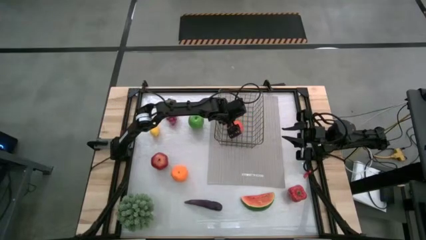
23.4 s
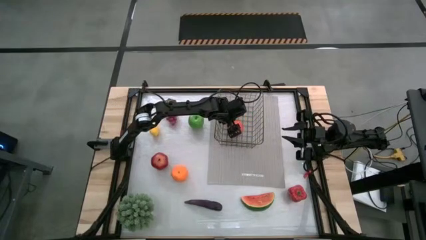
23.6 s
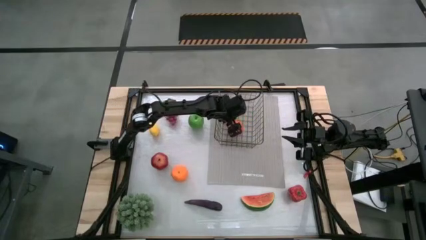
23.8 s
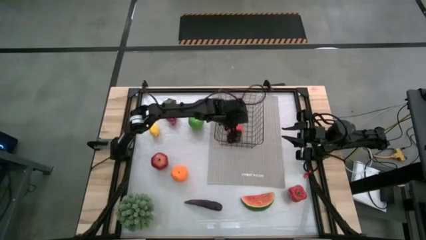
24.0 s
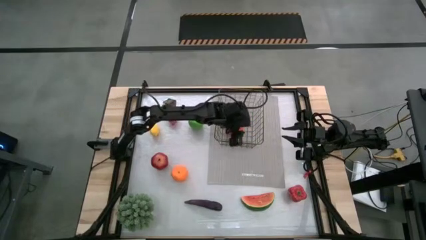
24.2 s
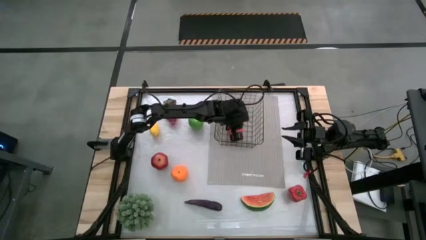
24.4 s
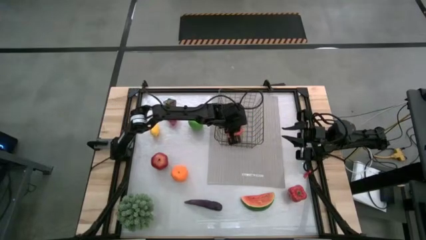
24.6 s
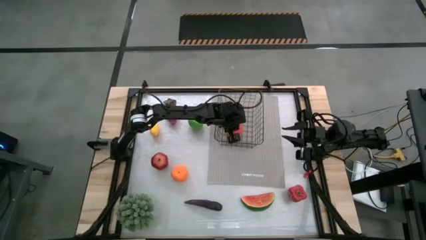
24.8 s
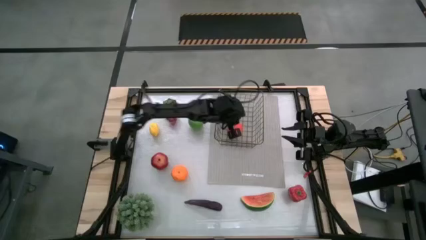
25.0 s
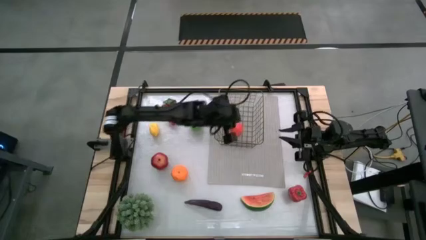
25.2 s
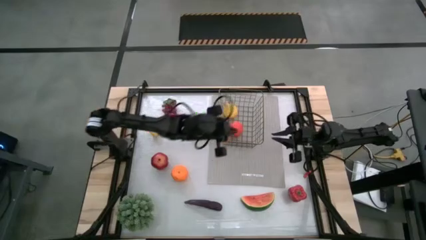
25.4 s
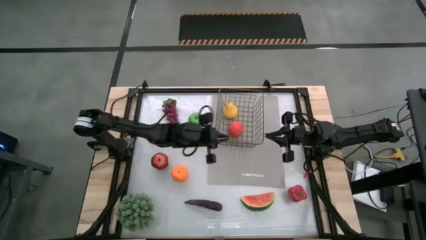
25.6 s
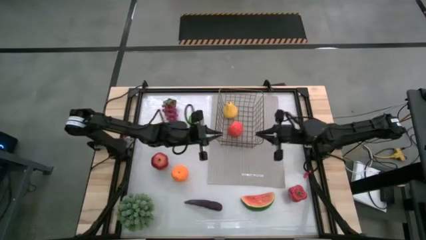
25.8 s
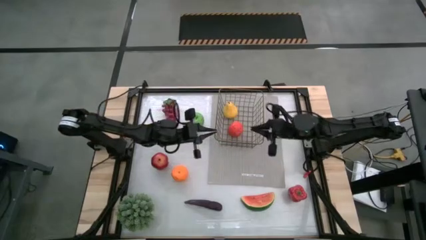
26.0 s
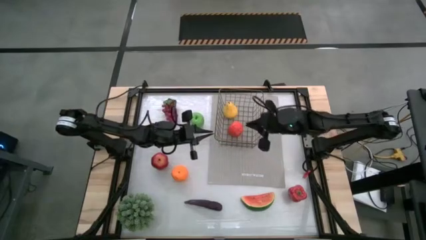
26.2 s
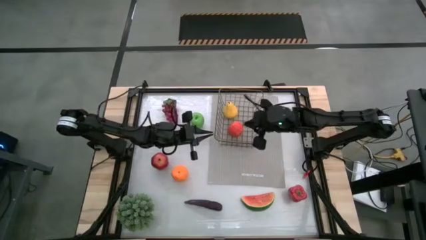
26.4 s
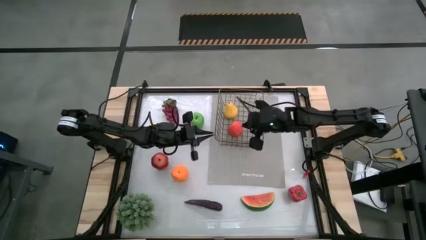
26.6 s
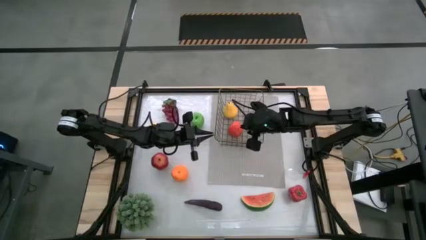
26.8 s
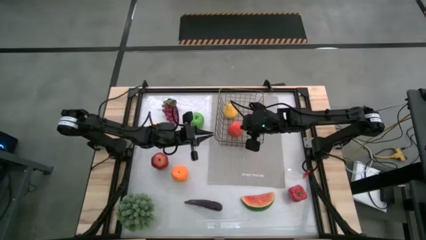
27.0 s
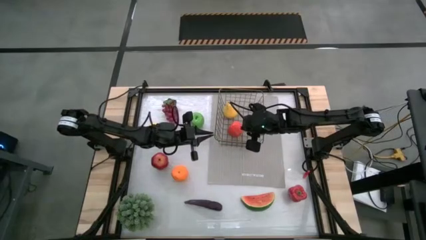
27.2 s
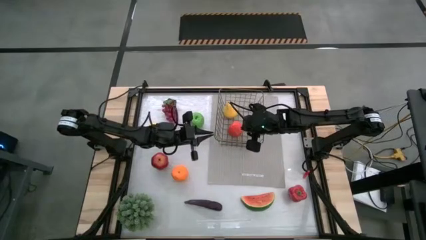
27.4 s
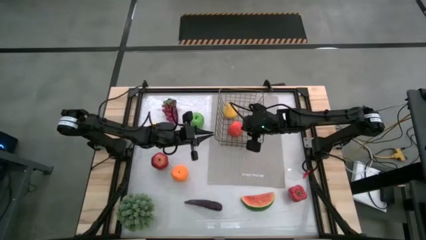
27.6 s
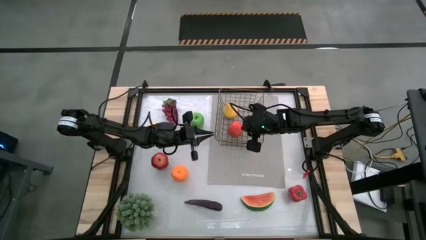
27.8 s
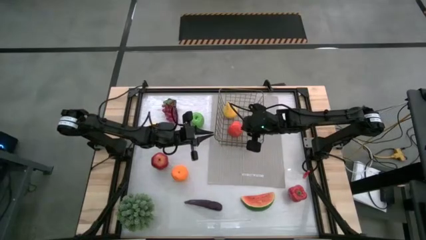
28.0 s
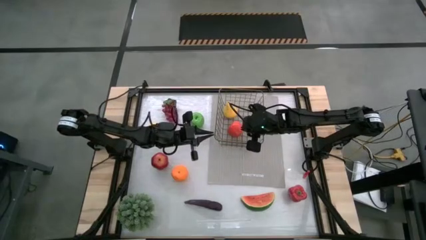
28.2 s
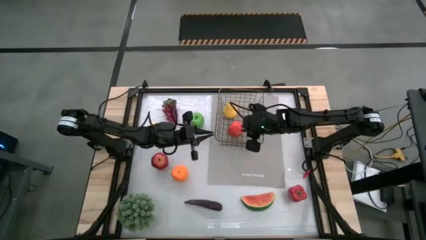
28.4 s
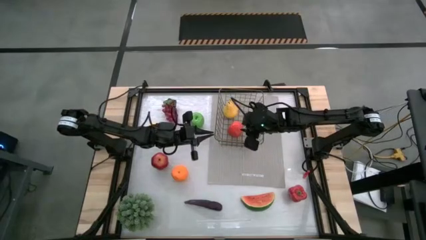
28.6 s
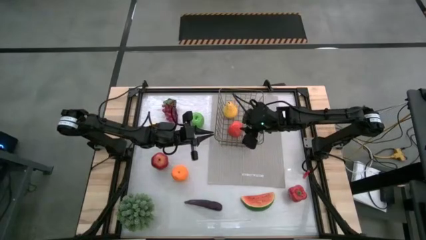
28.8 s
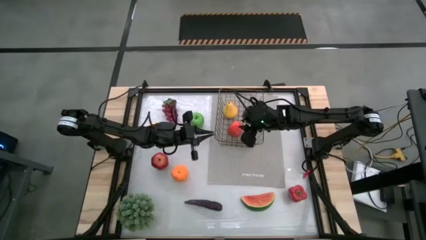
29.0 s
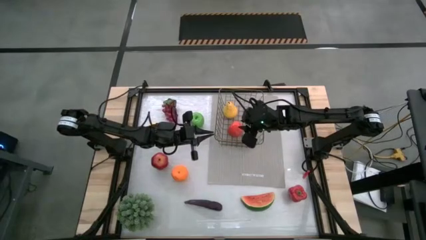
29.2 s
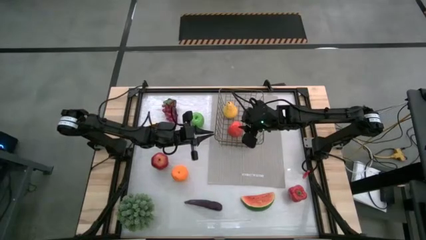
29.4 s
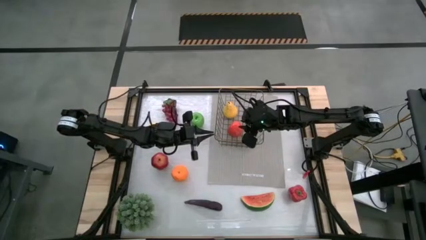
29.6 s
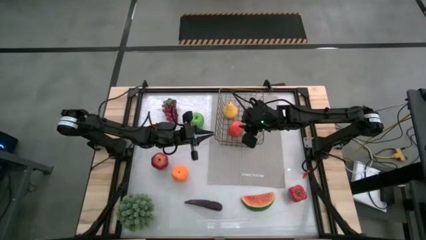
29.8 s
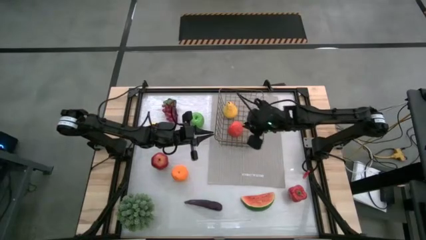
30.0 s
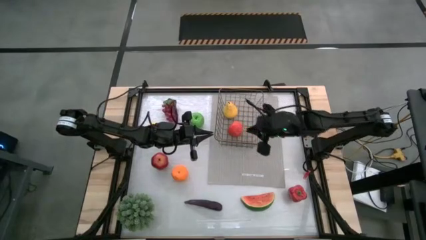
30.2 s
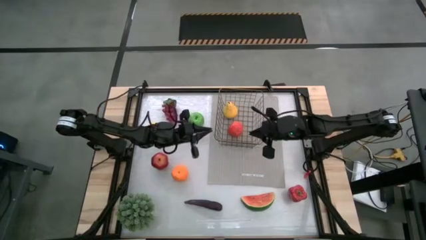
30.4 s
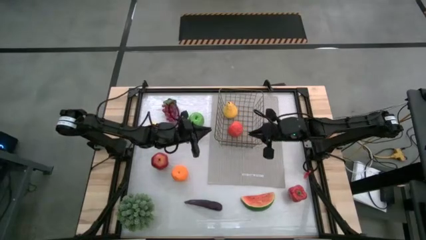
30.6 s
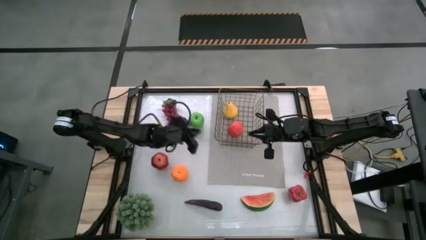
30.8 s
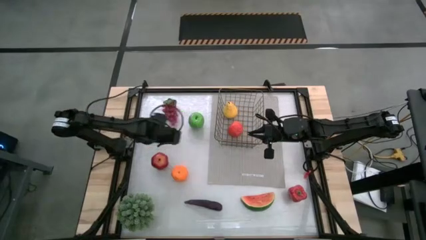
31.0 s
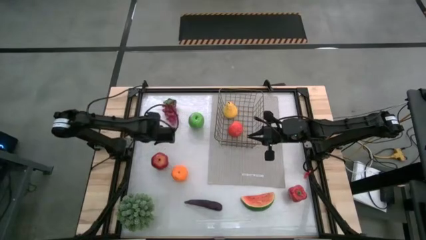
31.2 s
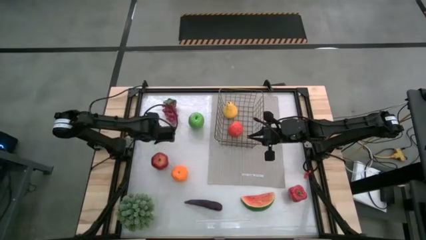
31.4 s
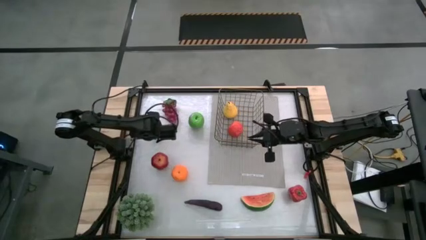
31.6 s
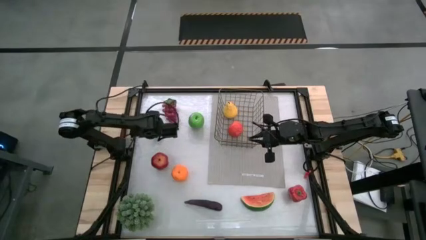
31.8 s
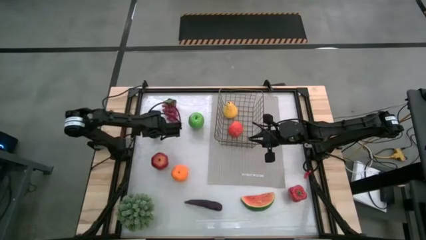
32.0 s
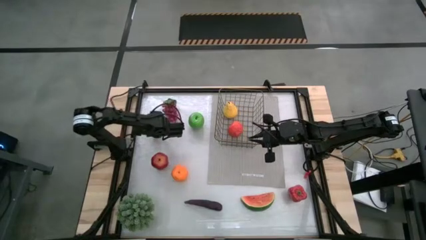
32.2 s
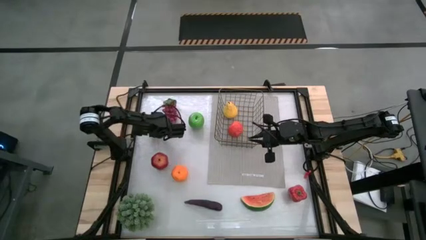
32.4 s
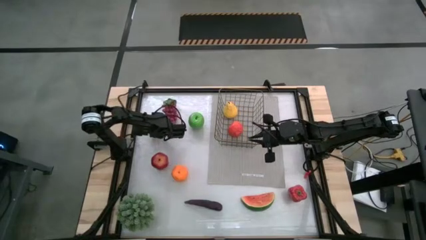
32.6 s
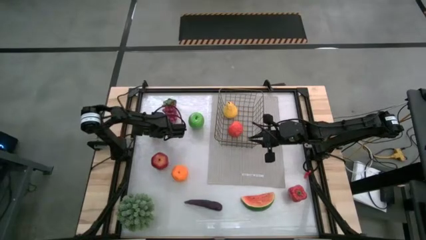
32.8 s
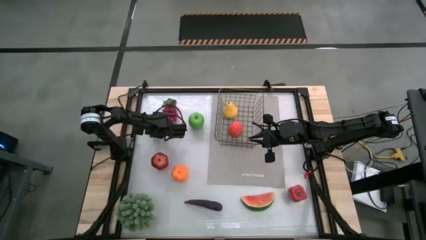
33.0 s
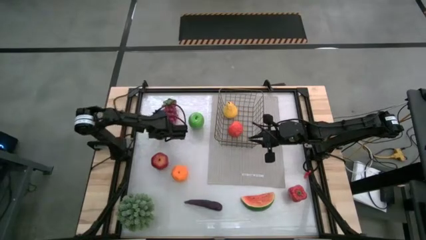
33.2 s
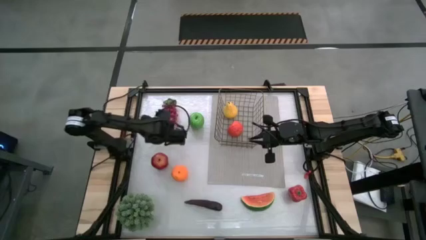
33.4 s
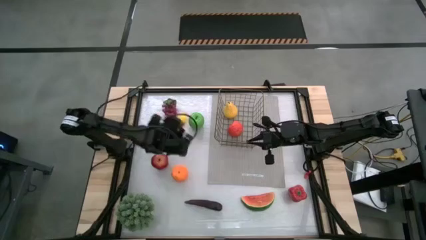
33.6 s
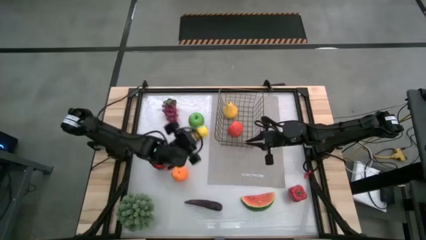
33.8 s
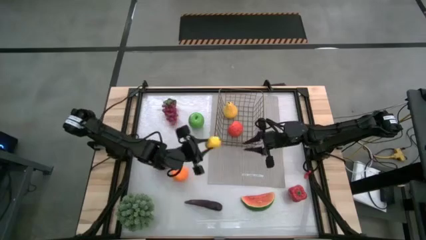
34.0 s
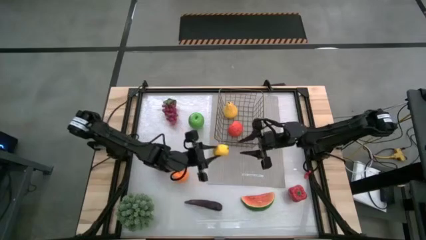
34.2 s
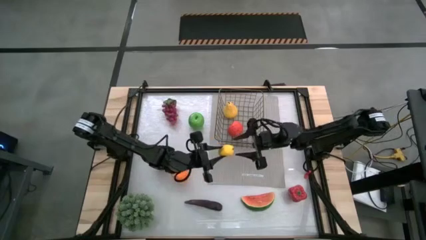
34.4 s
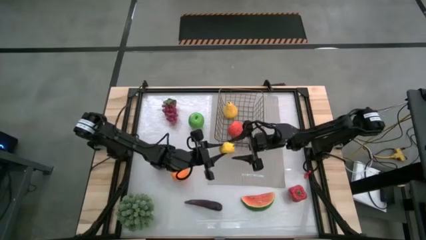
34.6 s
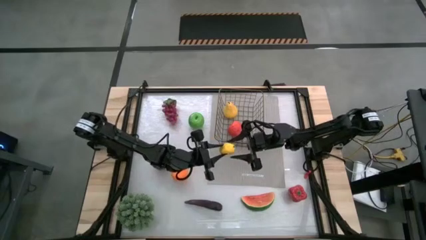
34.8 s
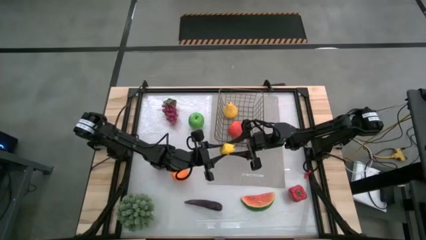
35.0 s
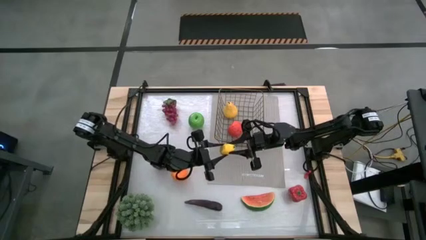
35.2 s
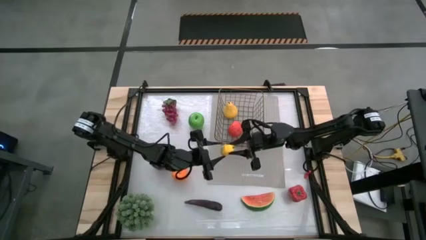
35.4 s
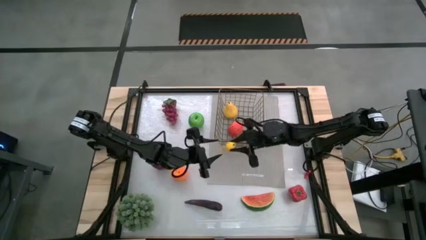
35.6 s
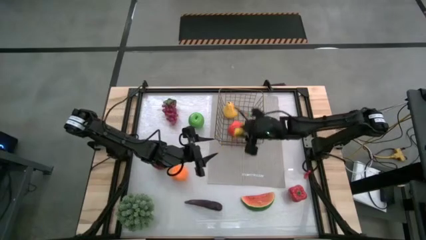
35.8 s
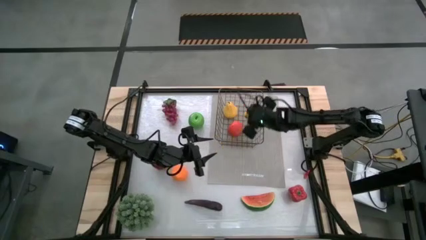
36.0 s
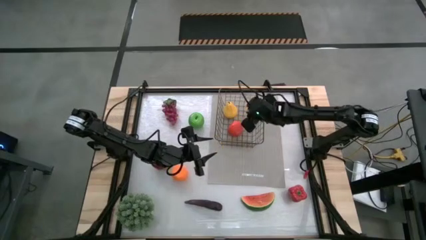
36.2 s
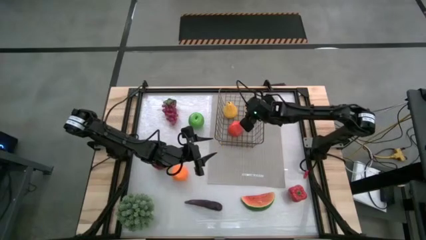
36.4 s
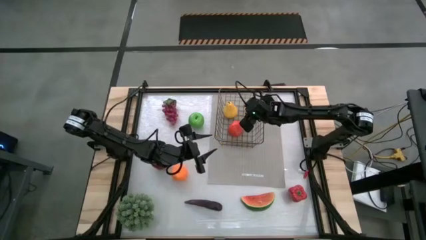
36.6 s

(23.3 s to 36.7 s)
Task: Build produce basket
Put the lemon into the wire basket
